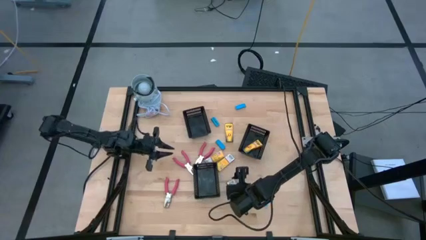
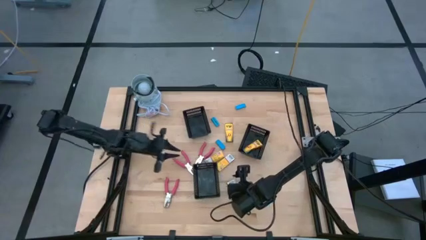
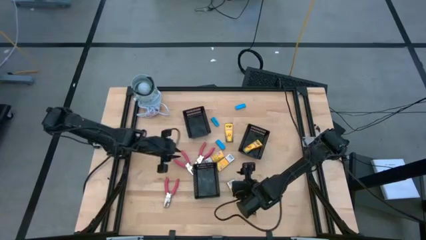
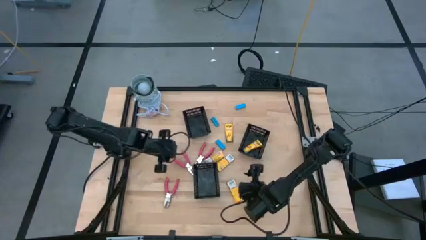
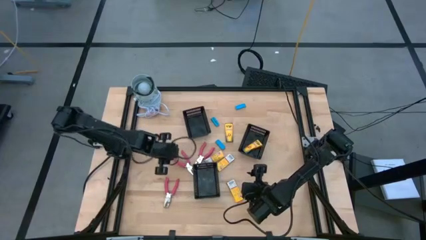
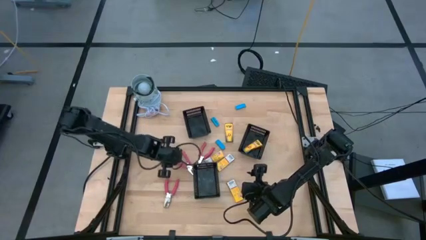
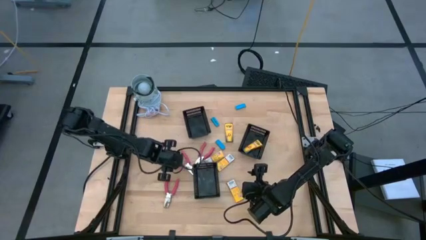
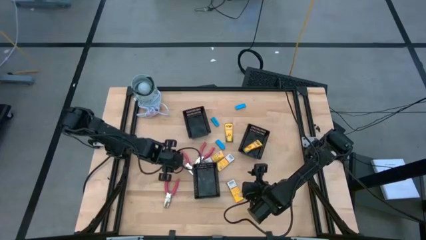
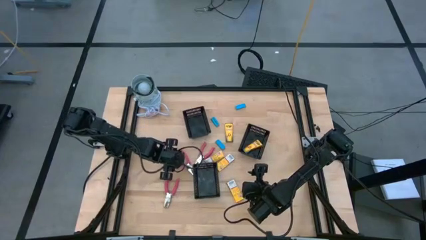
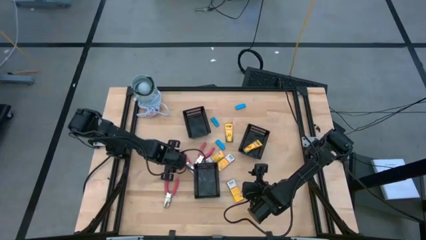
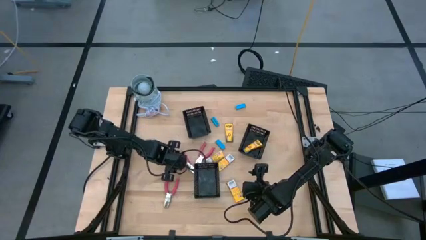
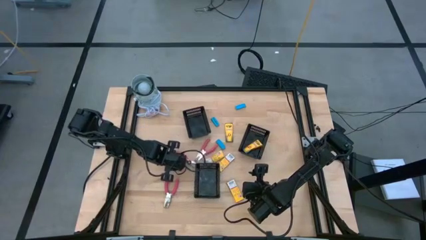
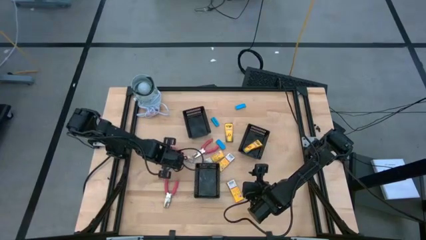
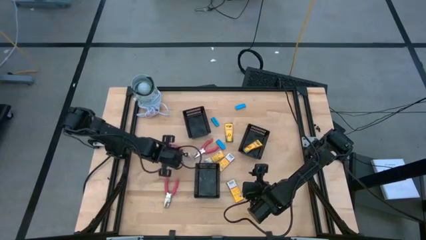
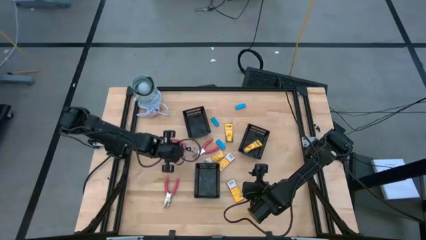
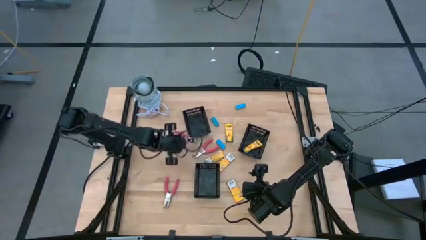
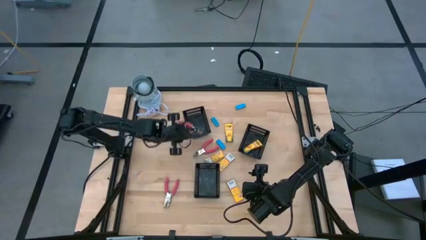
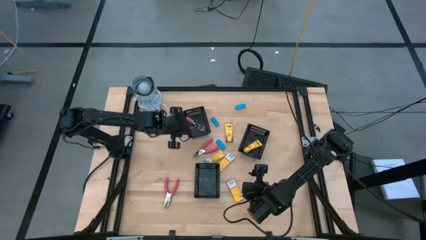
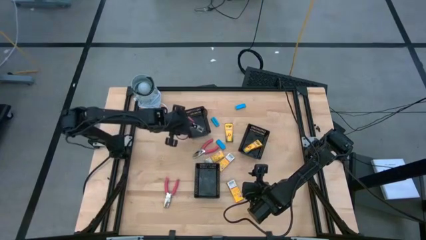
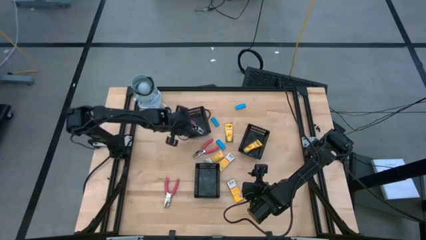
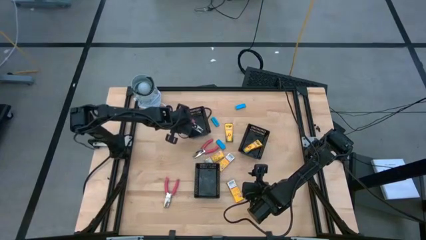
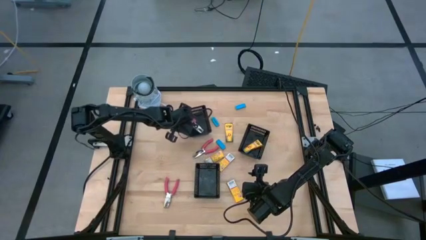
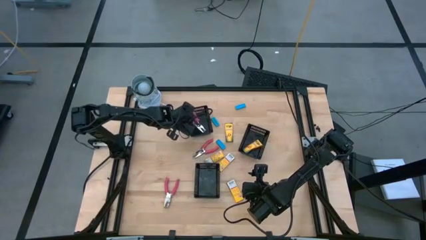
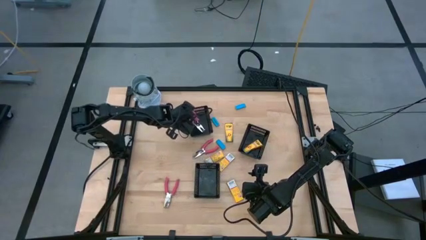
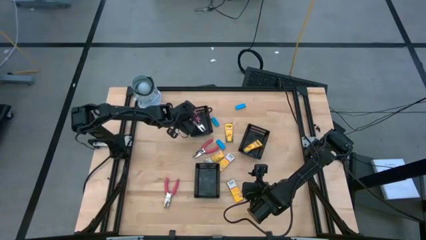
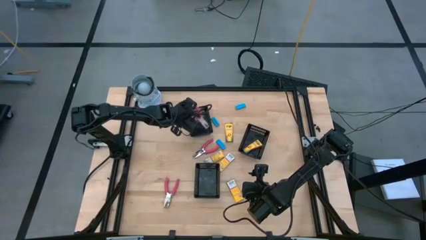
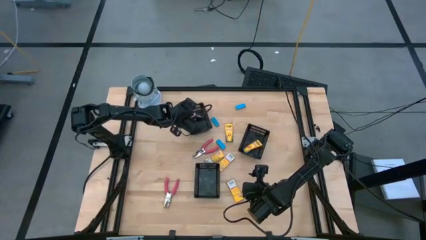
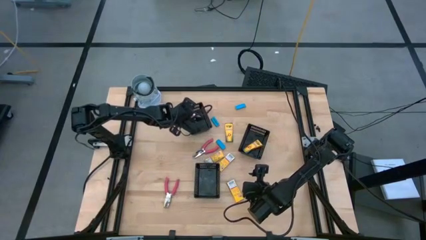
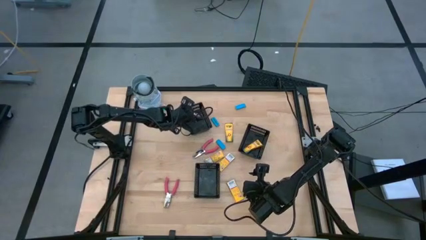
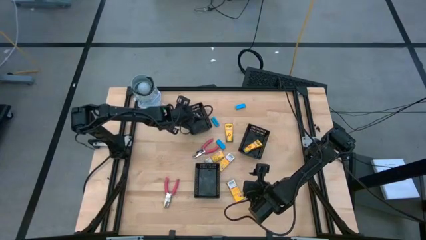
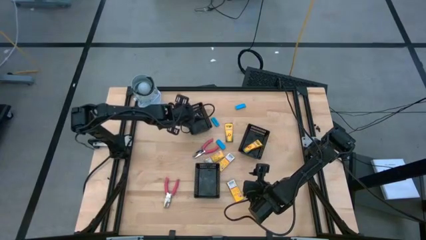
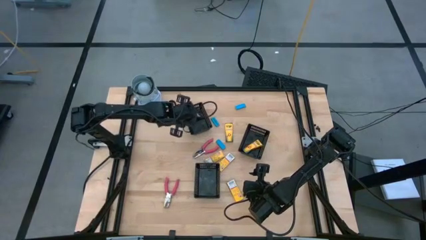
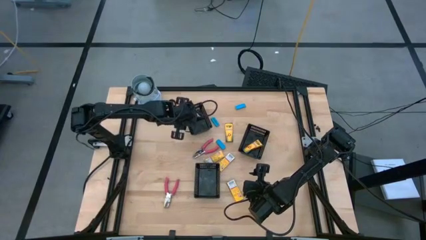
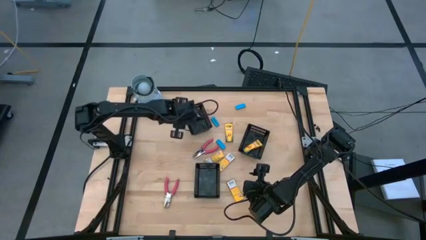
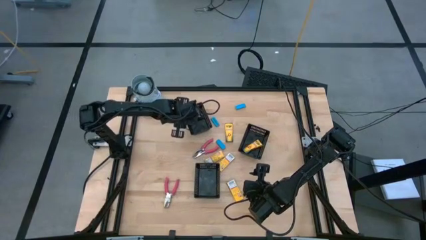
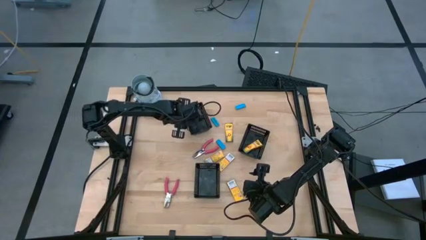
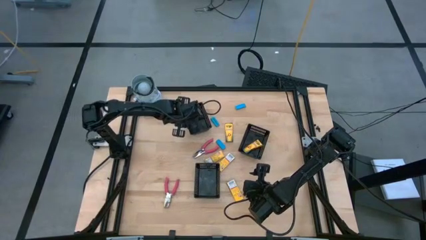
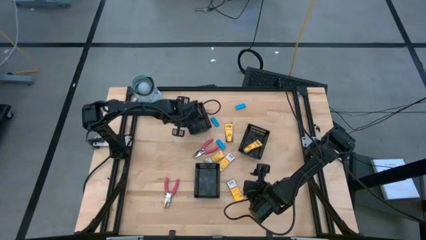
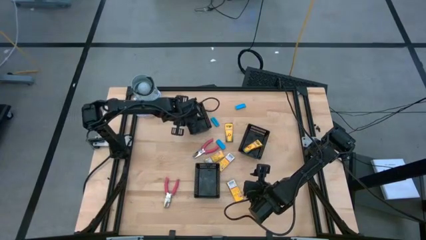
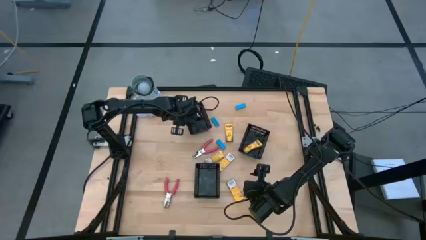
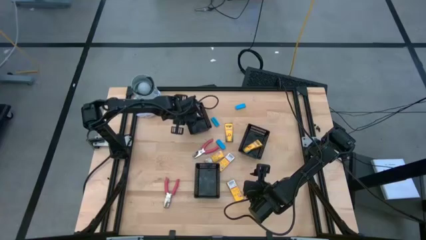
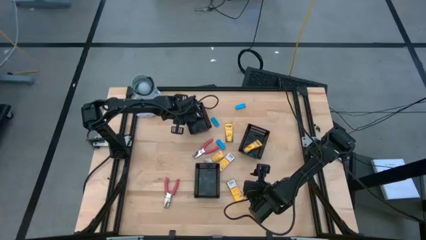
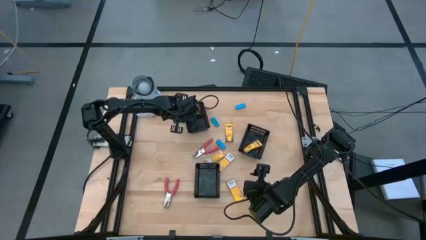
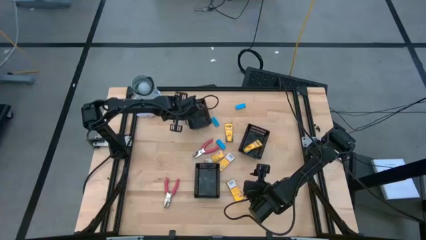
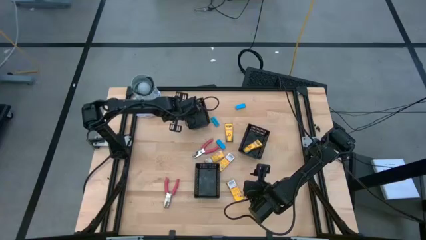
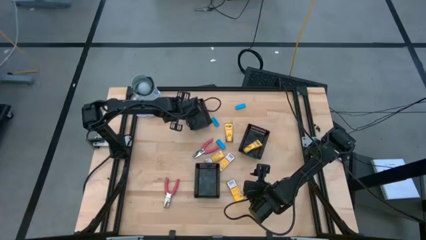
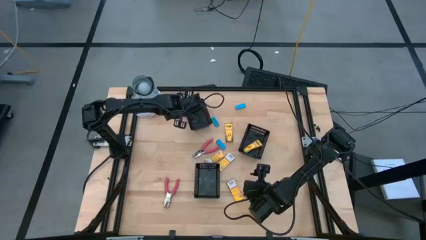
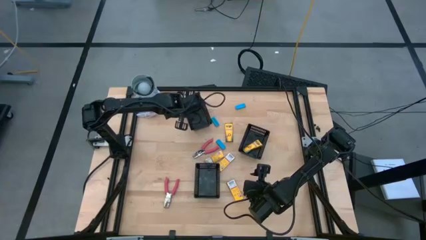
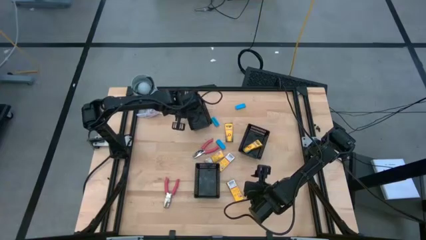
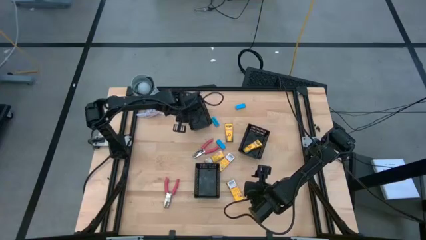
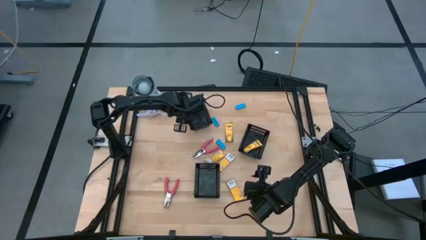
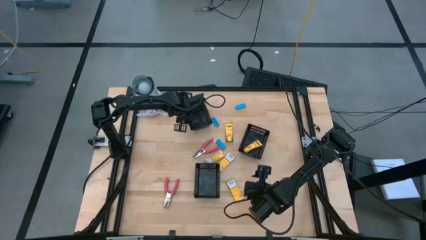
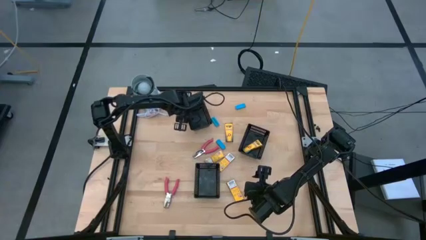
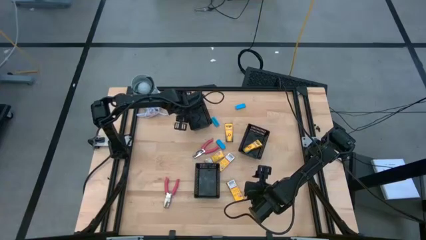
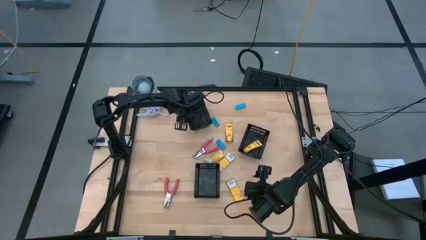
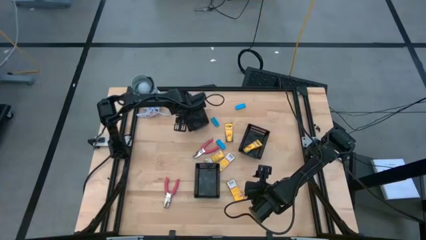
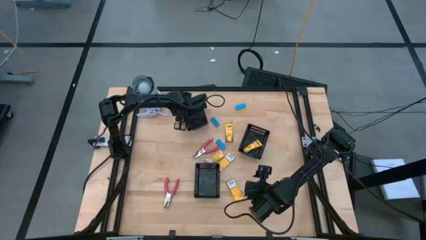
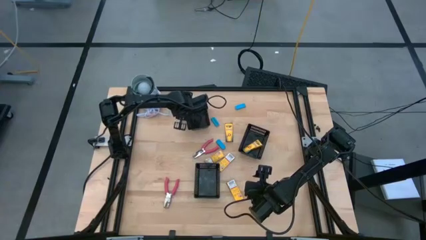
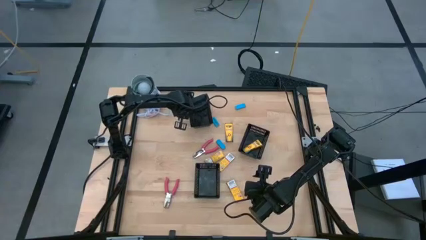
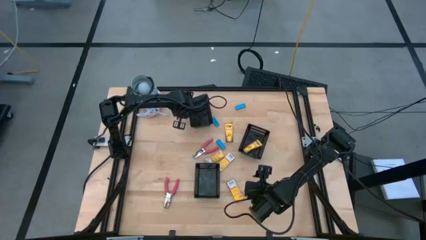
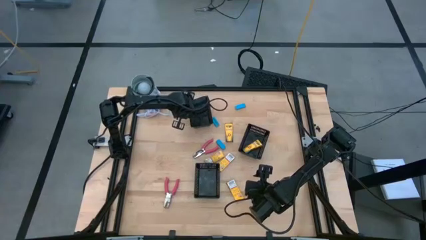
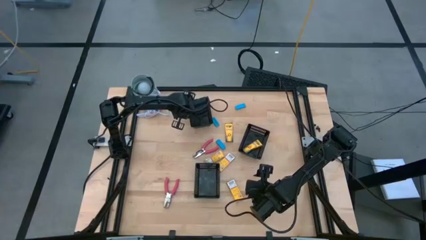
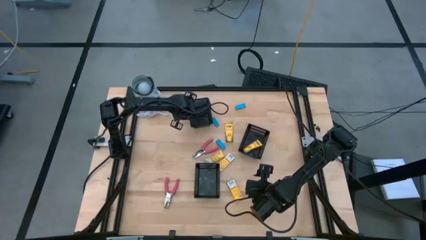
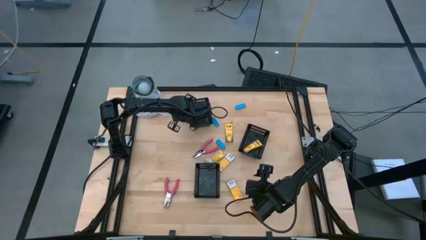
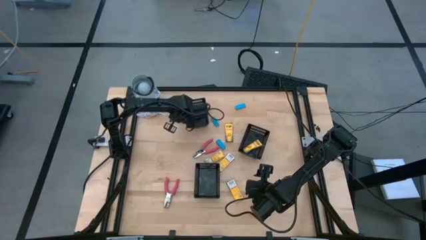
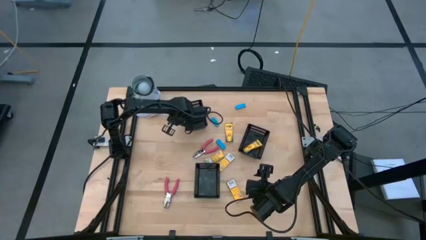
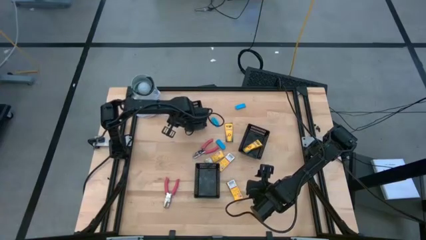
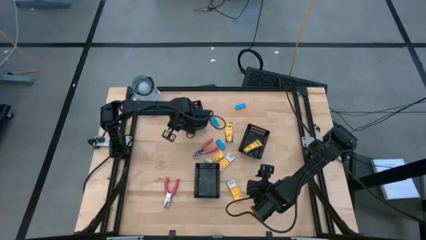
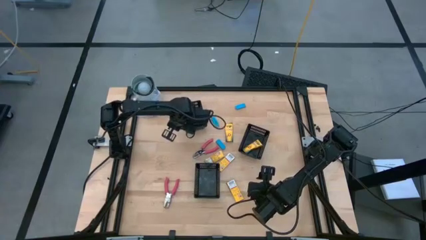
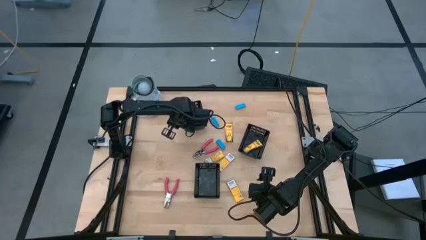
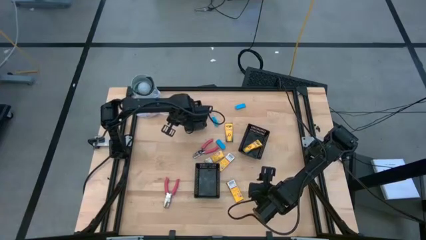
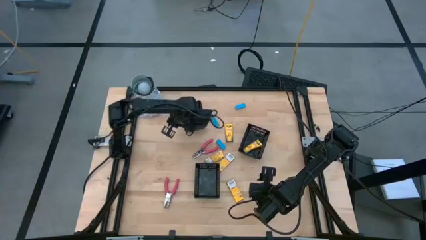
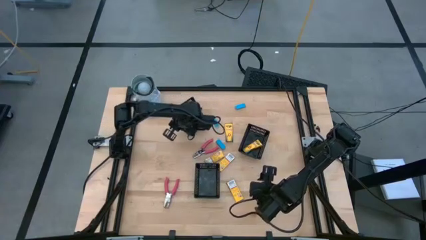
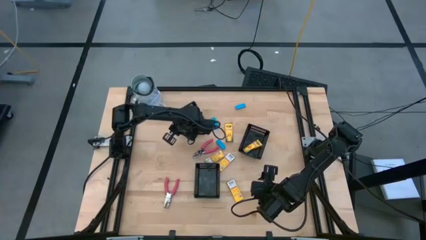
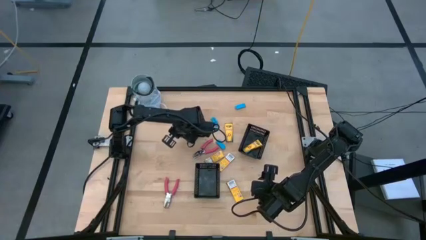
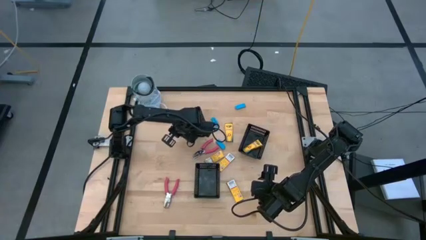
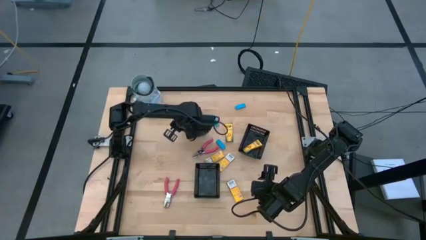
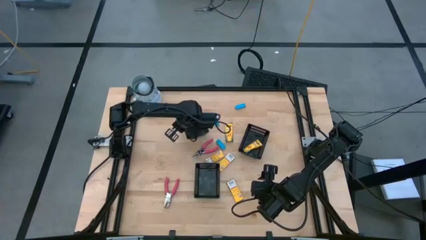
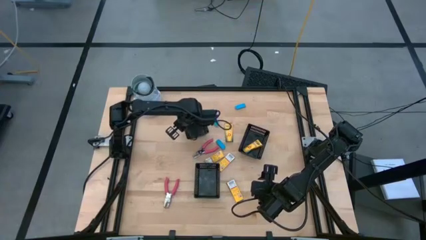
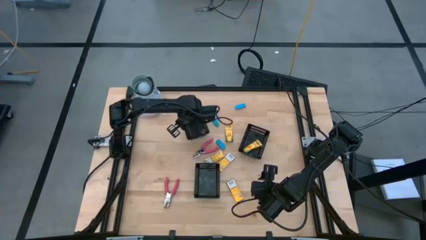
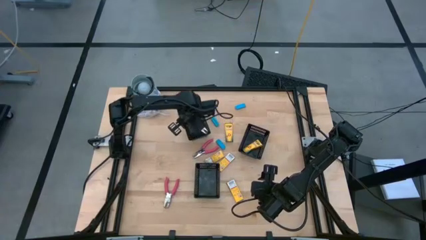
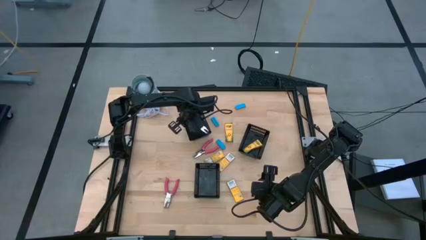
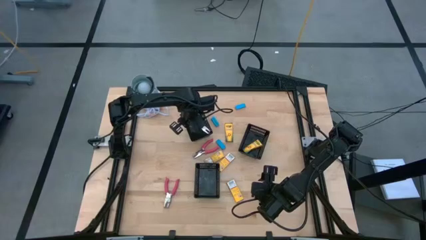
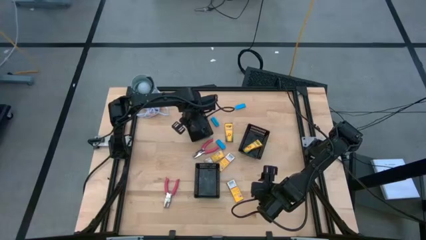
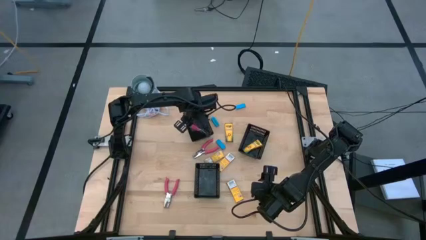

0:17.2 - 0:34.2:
Task: Pick & Place School Supplies
Put the pink puncher into the top right black basket
